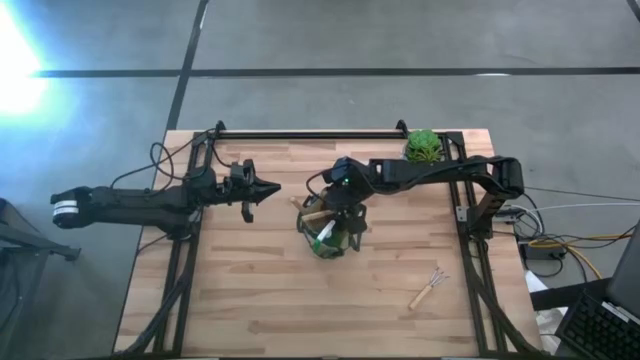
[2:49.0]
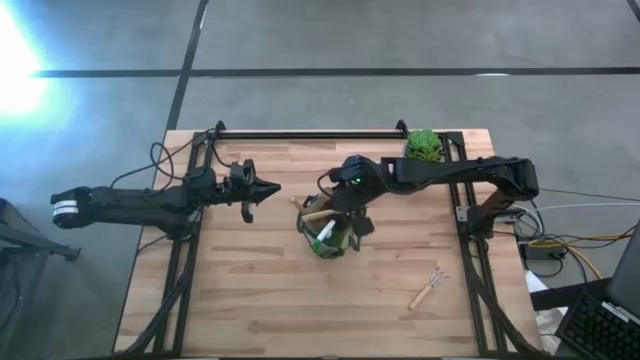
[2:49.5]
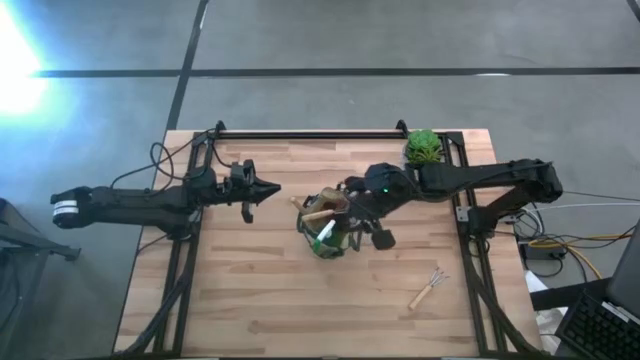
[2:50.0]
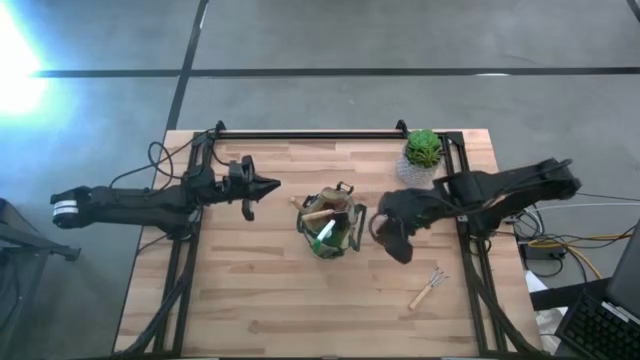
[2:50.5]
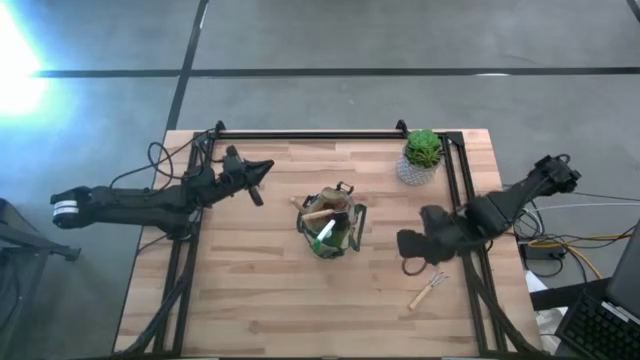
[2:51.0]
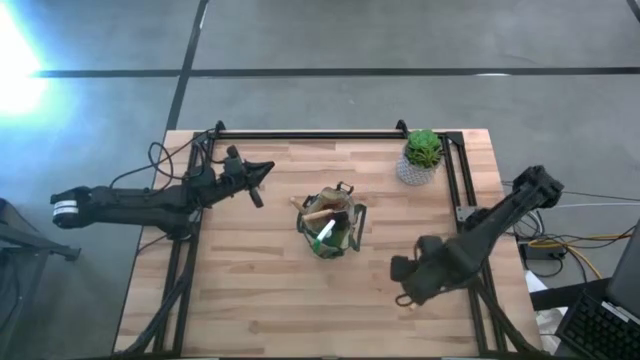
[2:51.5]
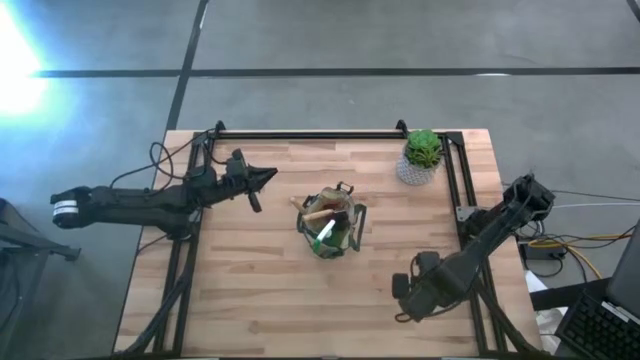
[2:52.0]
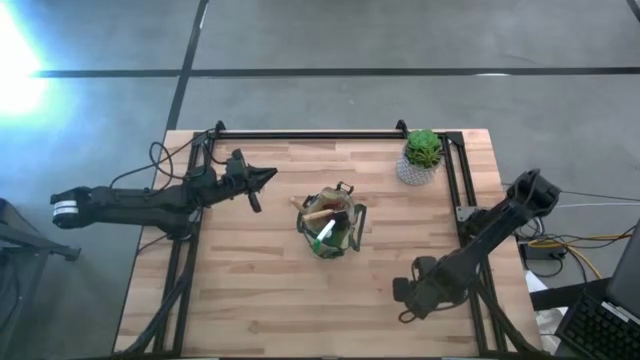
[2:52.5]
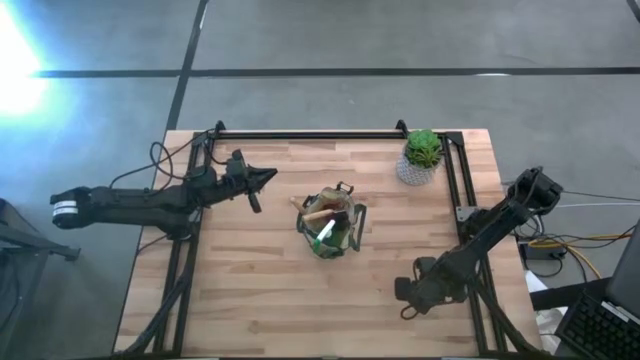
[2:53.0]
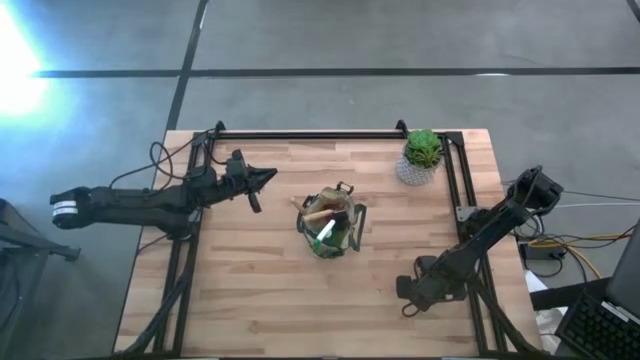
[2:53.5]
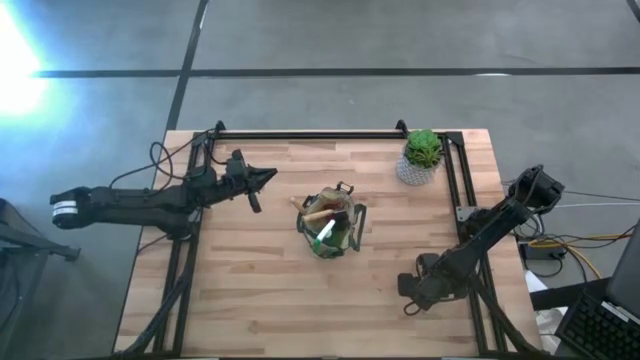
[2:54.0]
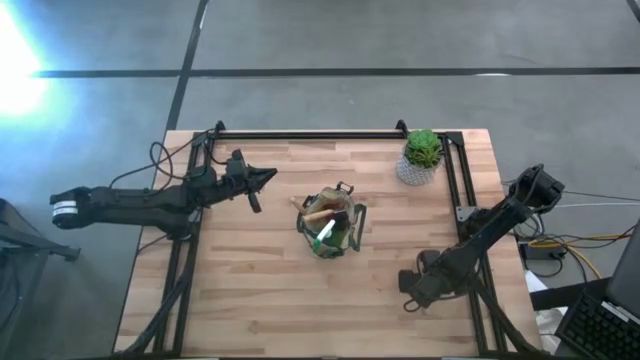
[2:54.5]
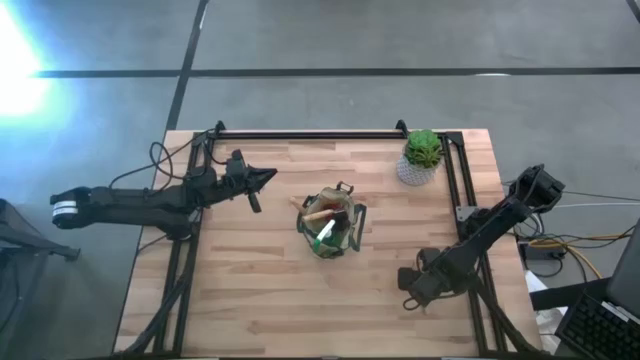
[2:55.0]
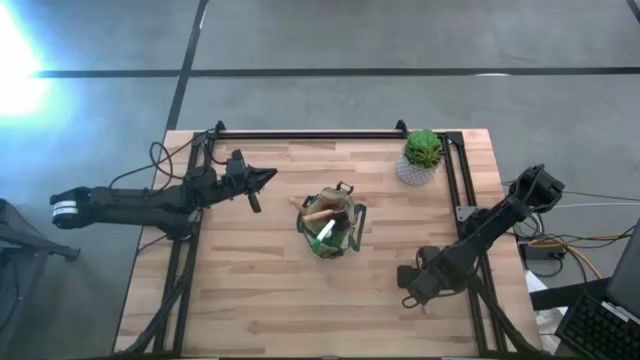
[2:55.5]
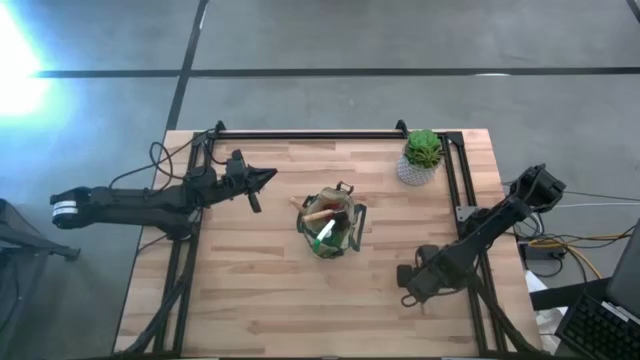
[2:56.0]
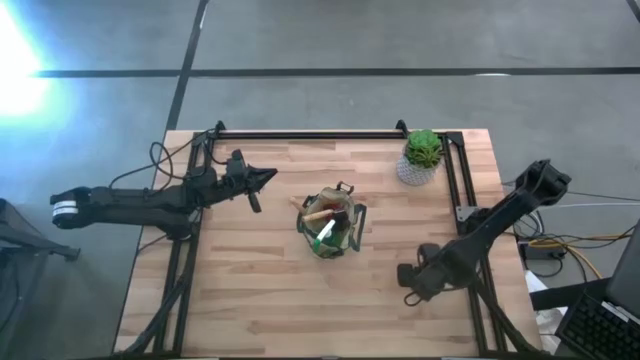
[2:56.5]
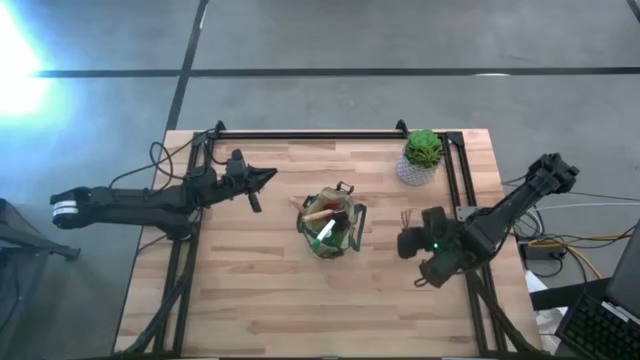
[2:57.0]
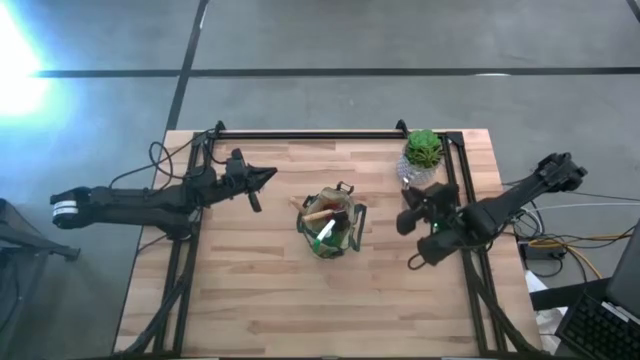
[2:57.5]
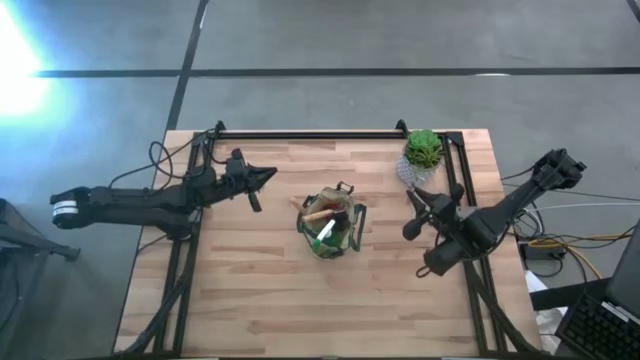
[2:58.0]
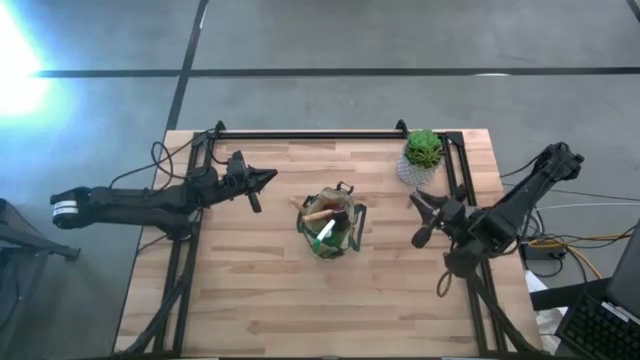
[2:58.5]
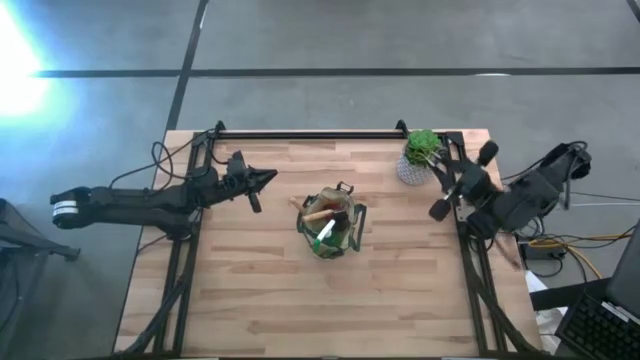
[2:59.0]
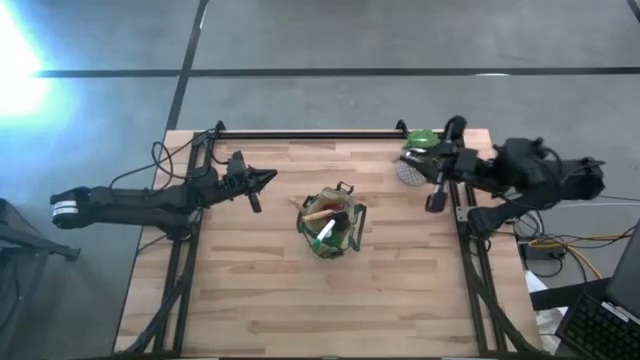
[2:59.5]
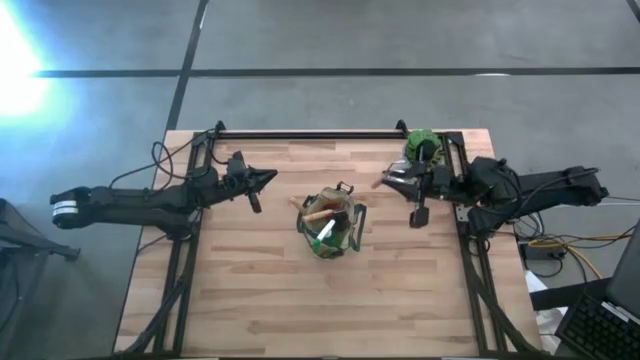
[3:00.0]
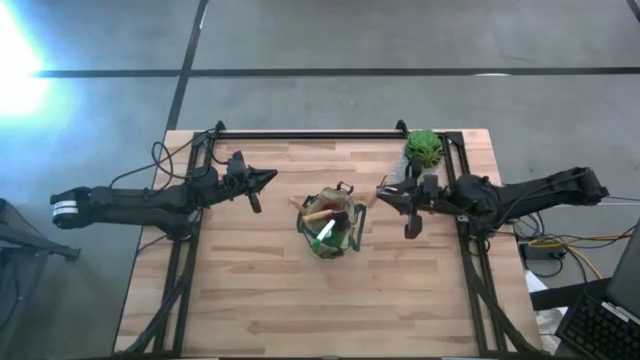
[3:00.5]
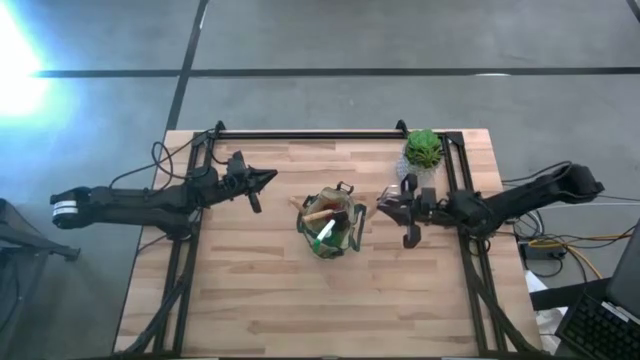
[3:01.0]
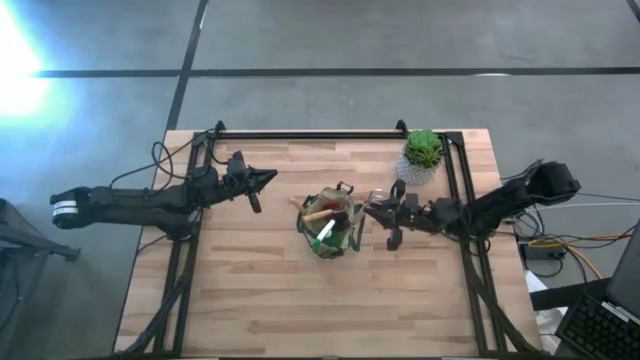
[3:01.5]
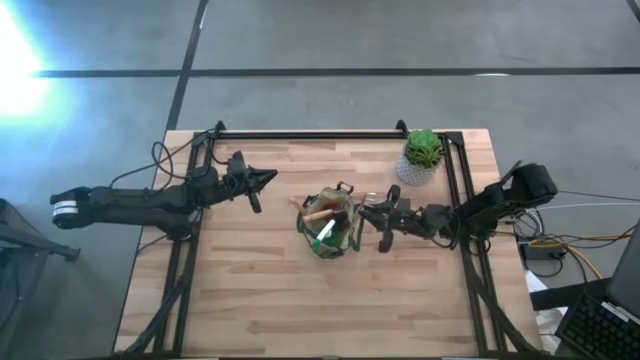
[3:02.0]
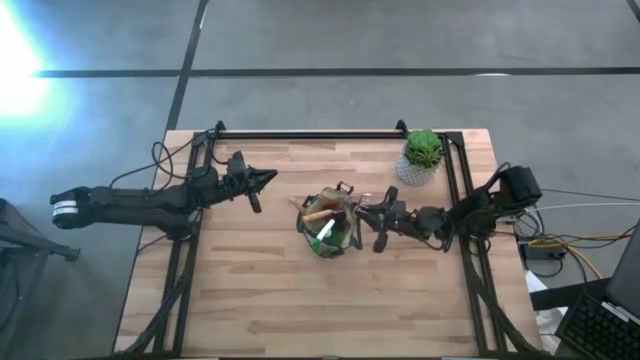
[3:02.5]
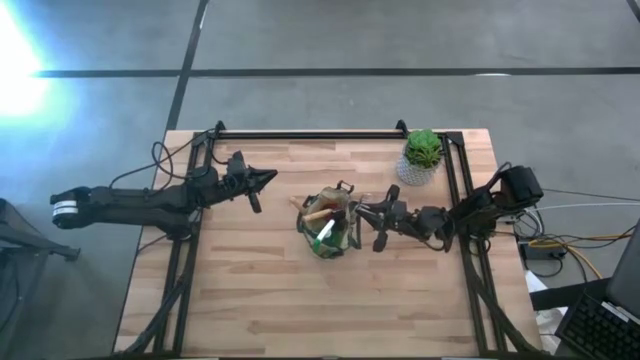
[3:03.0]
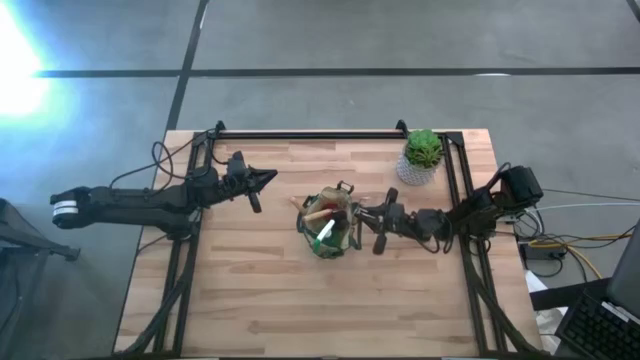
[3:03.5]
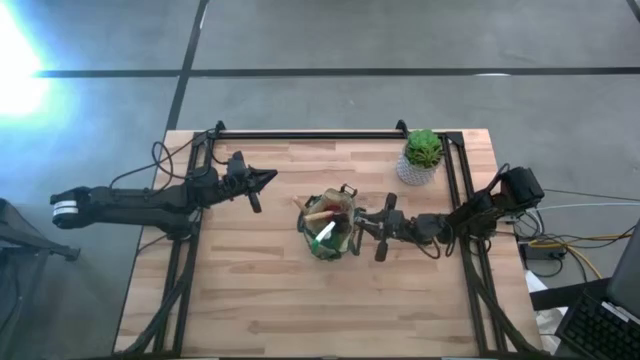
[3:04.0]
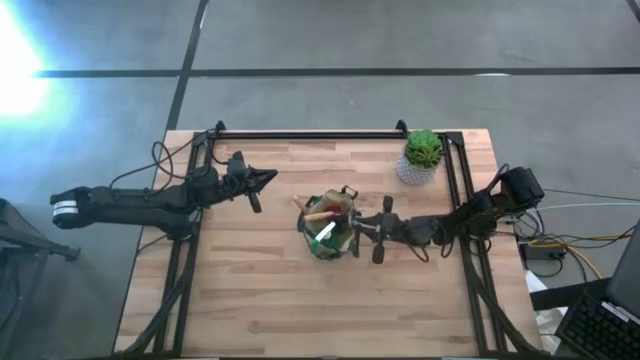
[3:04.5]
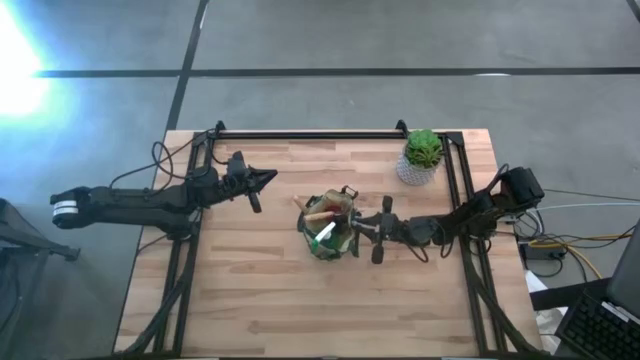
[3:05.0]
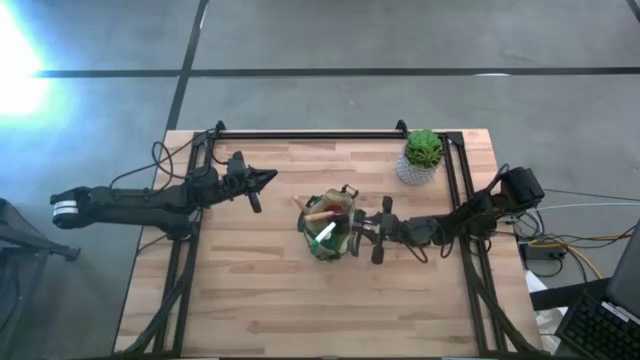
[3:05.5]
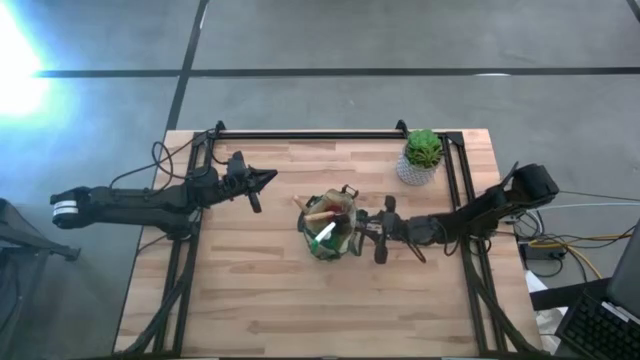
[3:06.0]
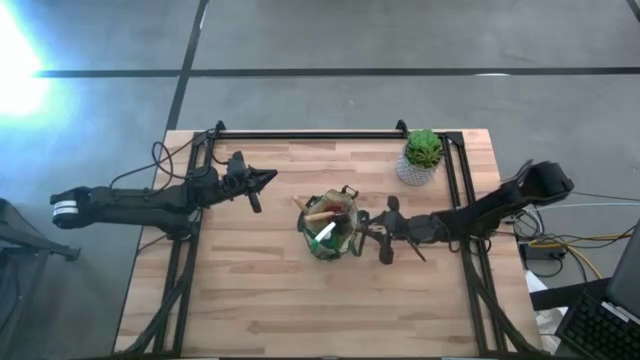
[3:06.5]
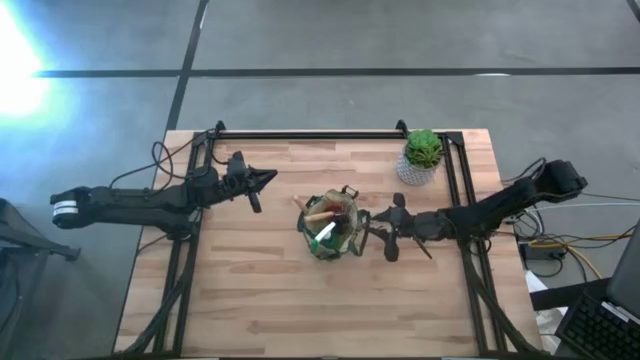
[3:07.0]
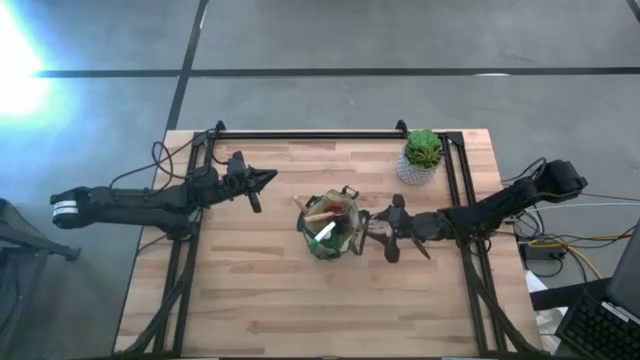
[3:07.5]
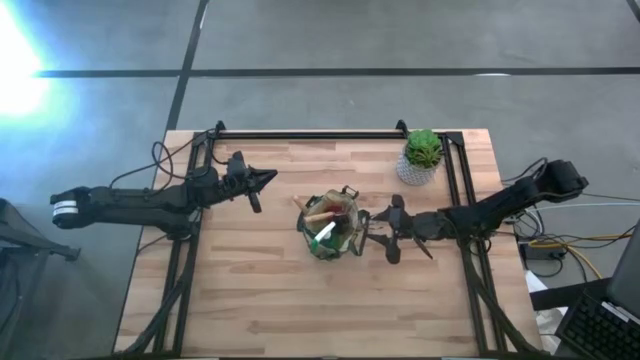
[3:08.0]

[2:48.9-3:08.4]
Task: Pick & Place Garden tools in Gardening bag
Put the brown hand rake into the light brown gardening bag

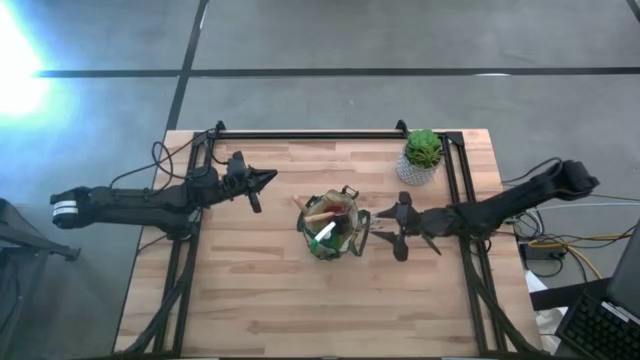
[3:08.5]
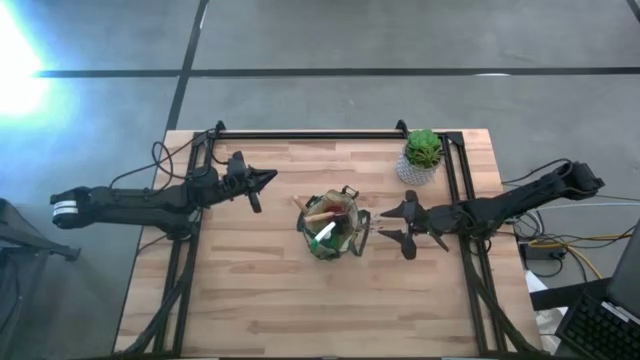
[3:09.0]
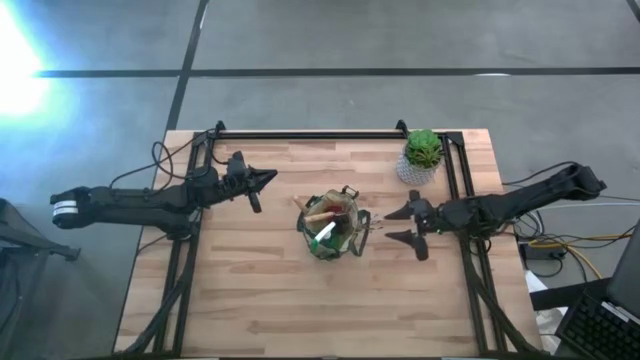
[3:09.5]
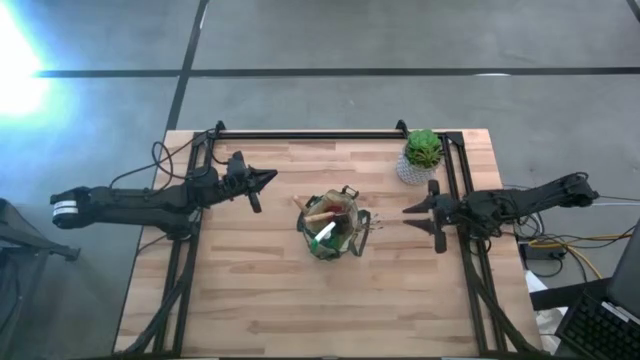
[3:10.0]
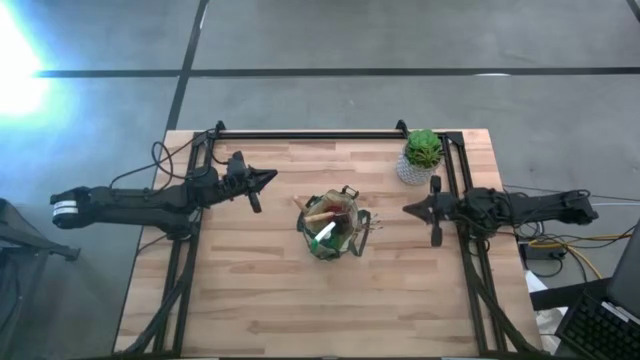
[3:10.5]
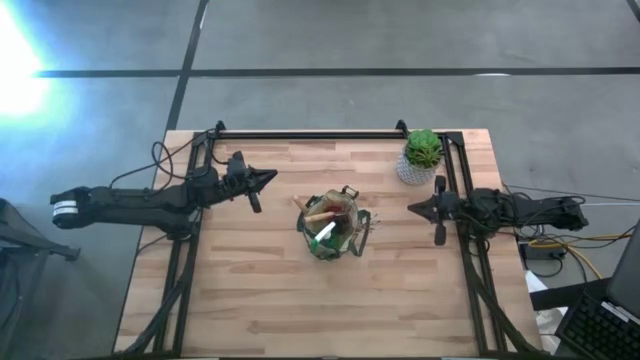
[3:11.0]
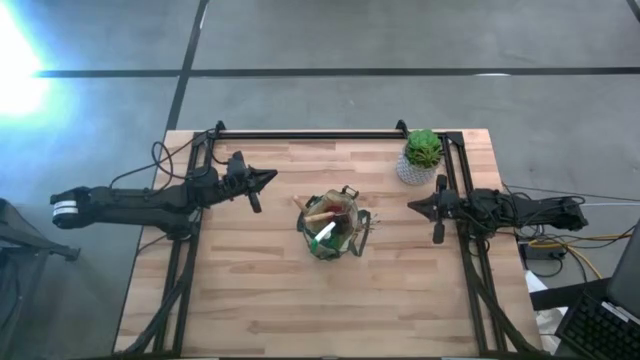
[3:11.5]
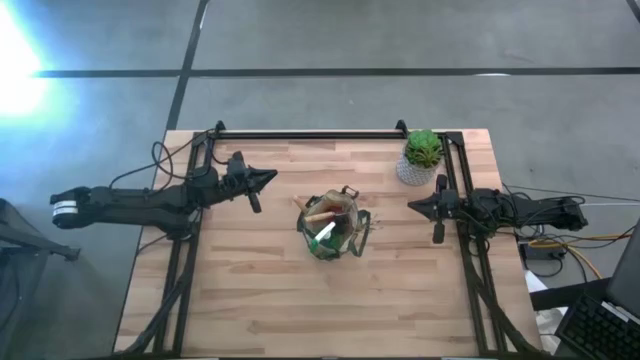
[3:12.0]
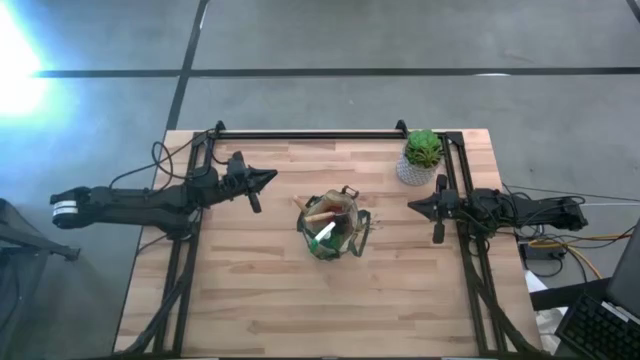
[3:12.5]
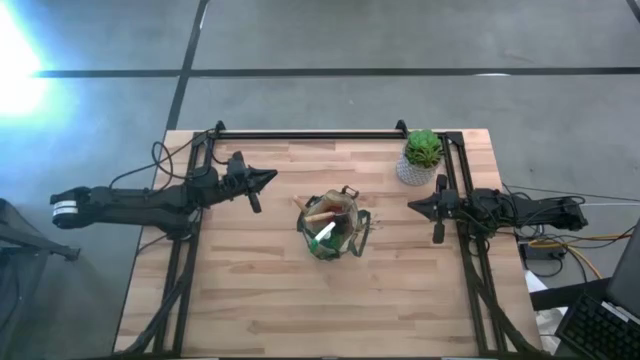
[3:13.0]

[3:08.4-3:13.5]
Return to Home Position
